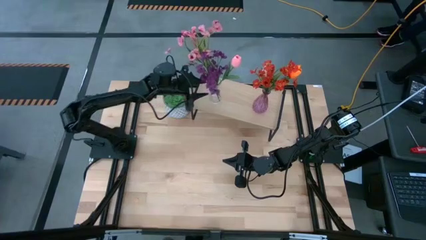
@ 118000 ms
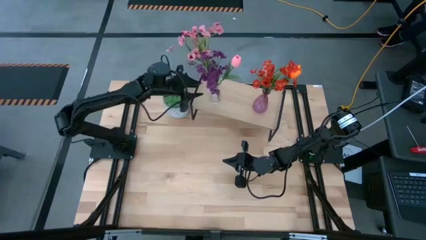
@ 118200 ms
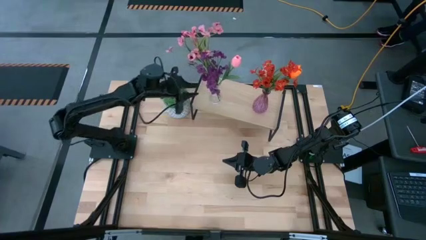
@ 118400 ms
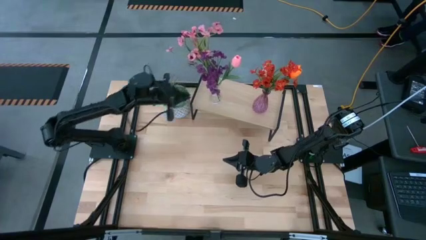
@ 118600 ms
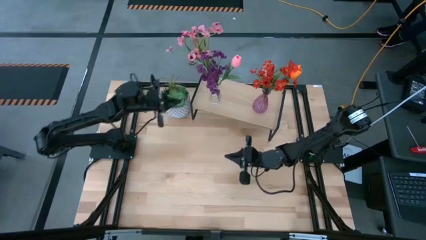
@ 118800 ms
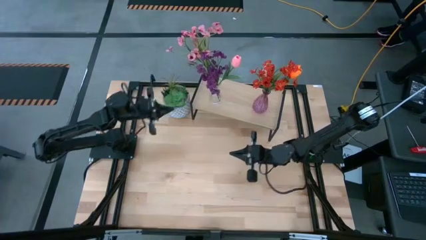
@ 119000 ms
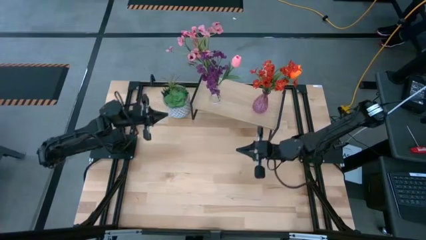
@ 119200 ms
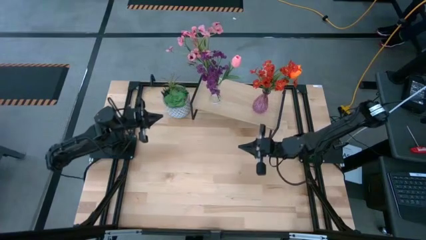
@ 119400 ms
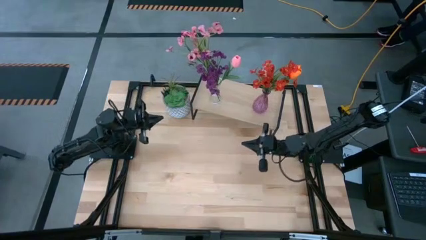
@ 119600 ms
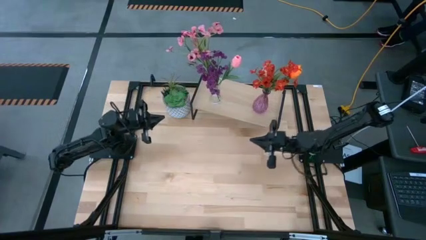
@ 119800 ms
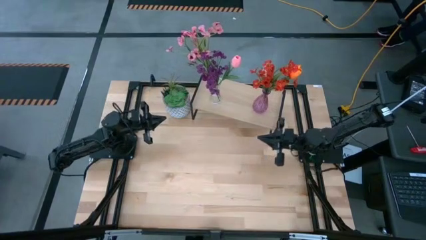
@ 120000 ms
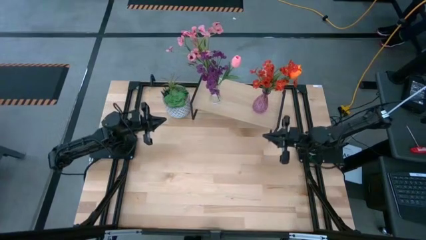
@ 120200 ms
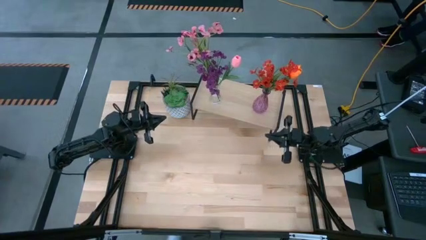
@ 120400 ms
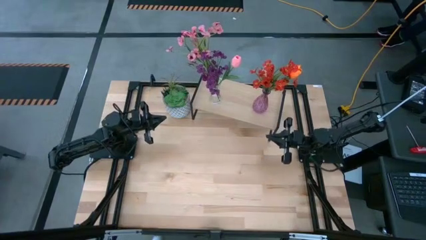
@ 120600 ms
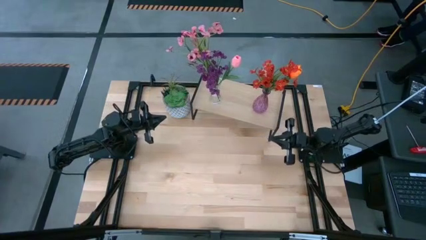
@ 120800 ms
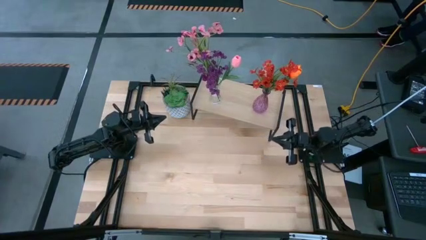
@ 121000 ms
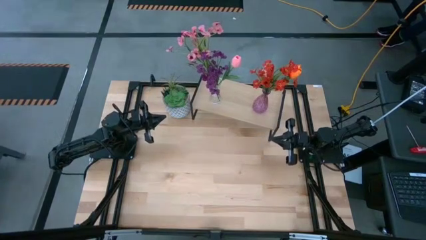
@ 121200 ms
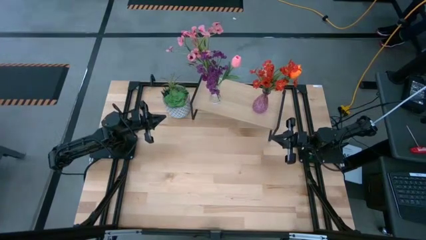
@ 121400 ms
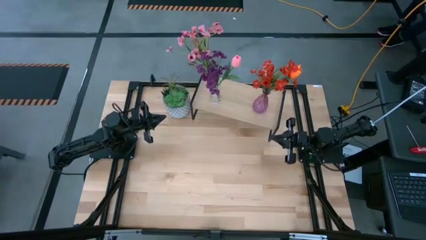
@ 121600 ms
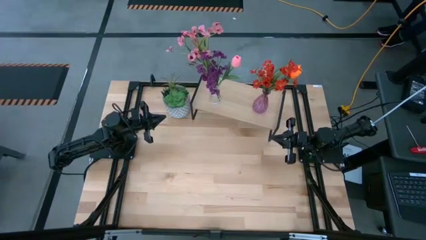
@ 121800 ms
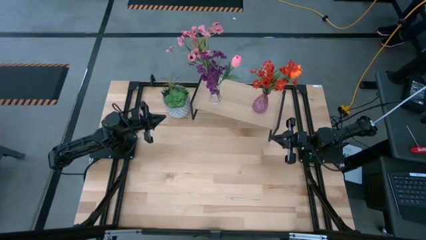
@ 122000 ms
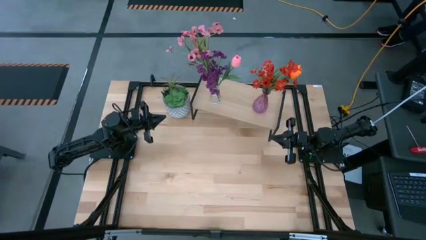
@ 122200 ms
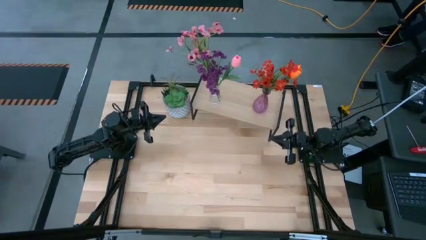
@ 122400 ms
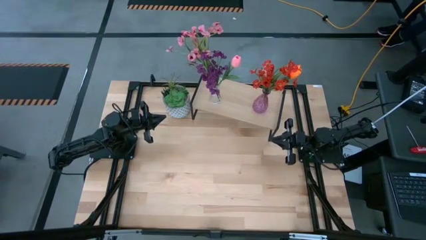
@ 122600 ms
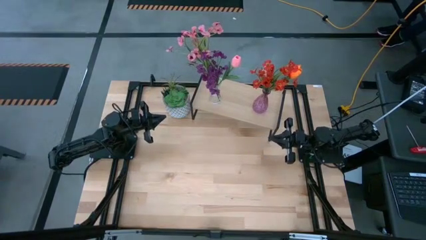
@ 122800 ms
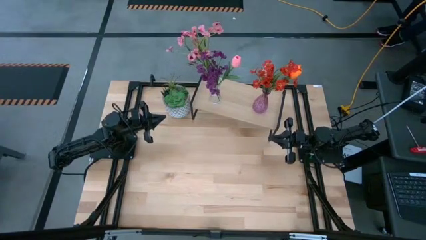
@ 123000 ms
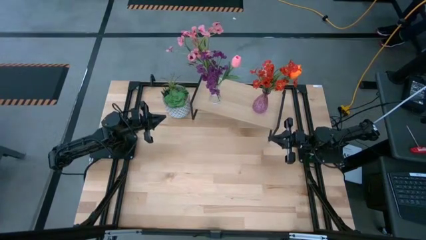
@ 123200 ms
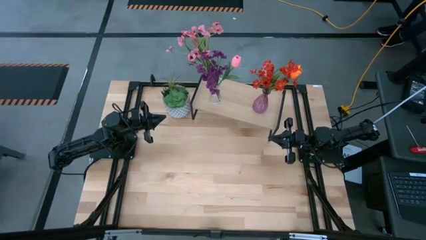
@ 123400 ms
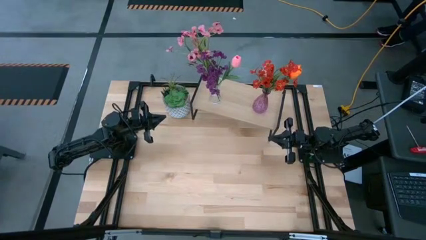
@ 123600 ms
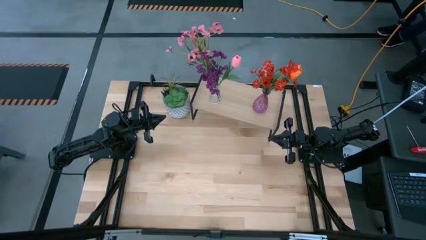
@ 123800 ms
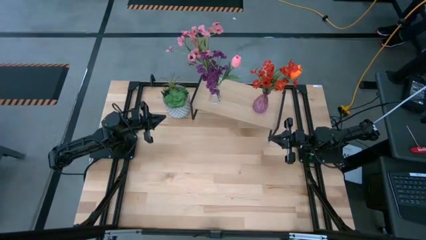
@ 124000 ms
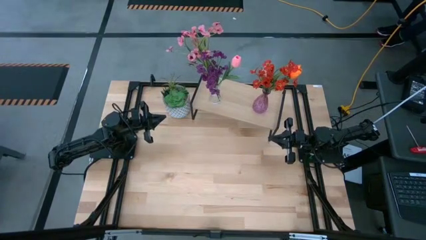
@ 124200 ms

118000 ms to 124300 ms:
Task: Pick and place flowers into a vace then onto a shelf
Return to Home Position

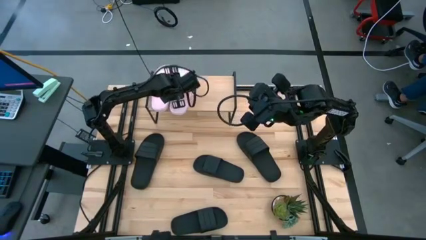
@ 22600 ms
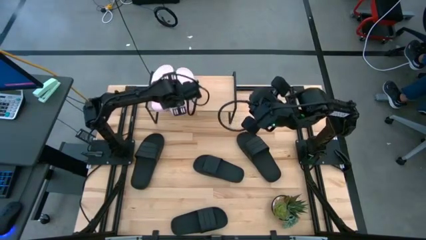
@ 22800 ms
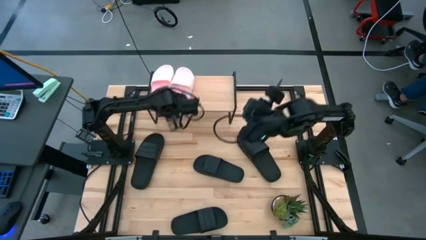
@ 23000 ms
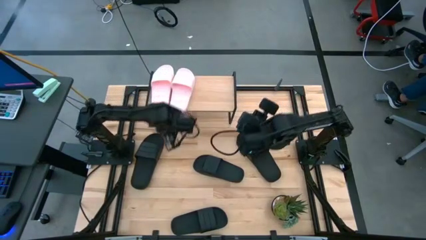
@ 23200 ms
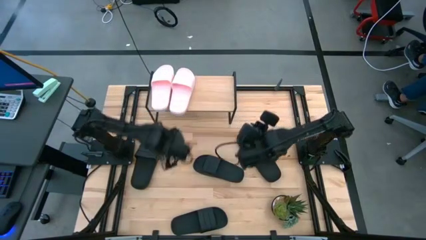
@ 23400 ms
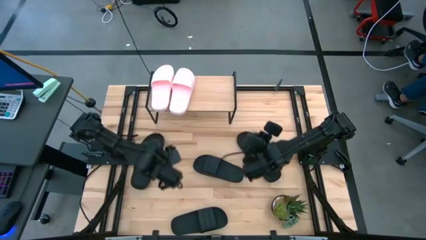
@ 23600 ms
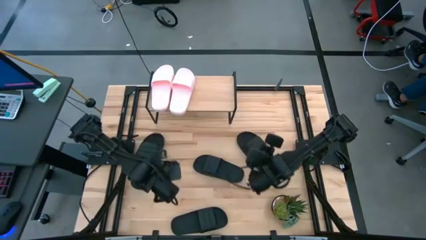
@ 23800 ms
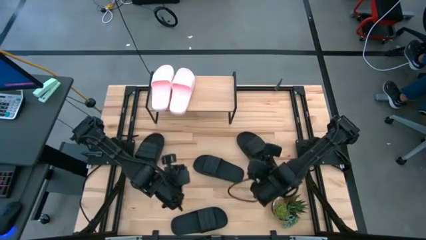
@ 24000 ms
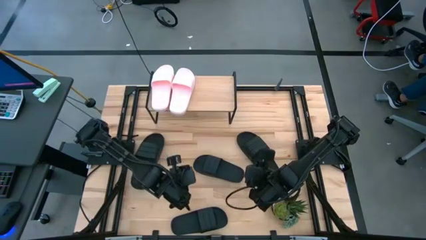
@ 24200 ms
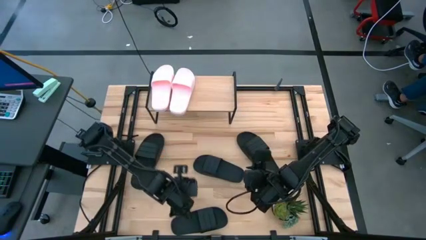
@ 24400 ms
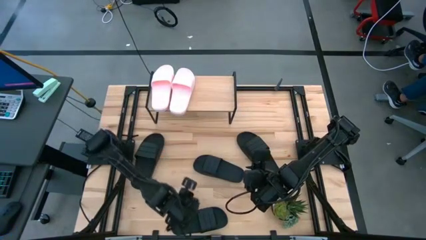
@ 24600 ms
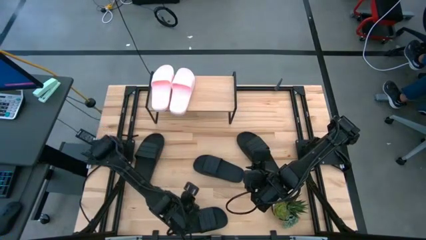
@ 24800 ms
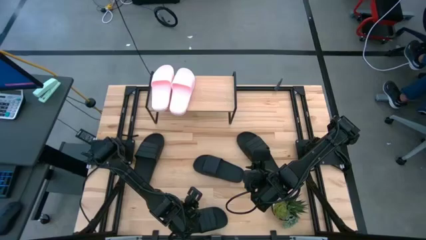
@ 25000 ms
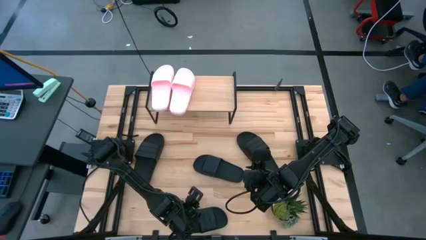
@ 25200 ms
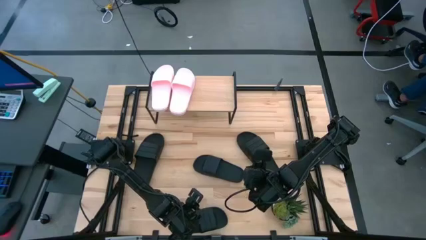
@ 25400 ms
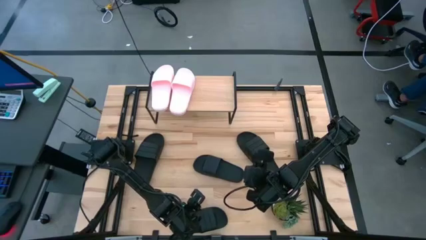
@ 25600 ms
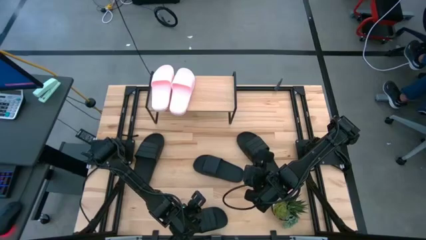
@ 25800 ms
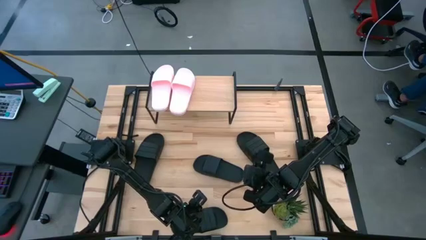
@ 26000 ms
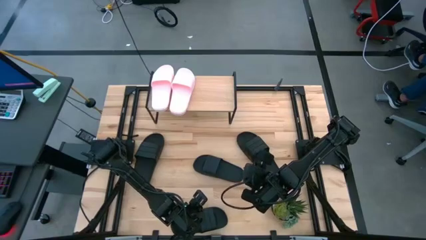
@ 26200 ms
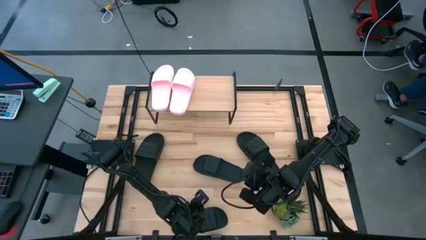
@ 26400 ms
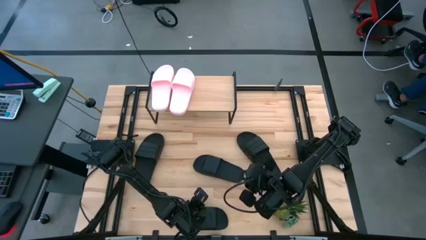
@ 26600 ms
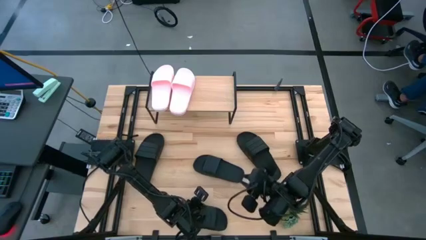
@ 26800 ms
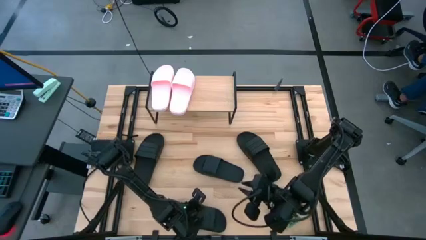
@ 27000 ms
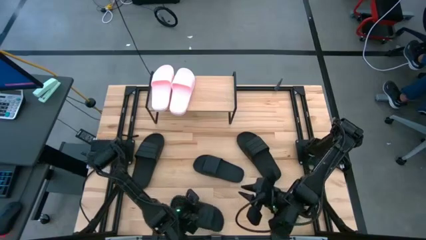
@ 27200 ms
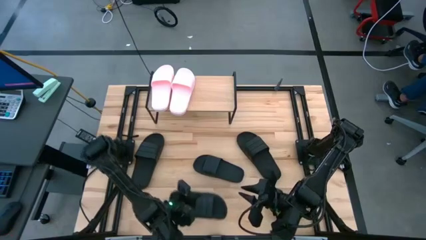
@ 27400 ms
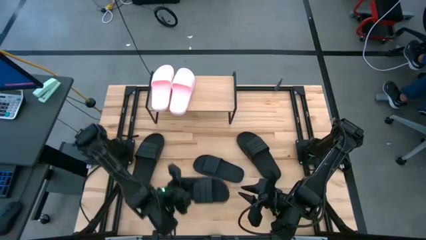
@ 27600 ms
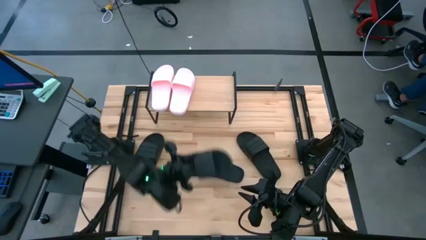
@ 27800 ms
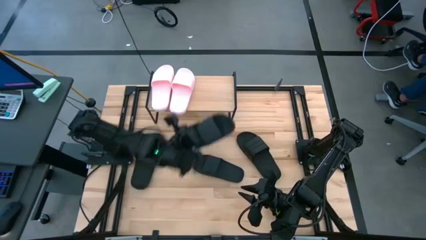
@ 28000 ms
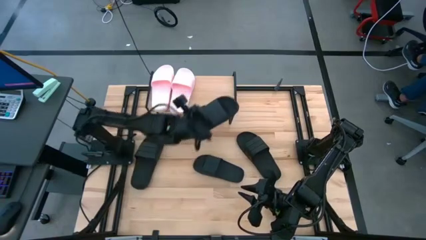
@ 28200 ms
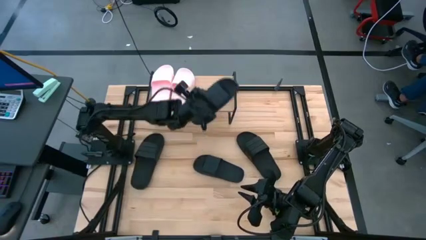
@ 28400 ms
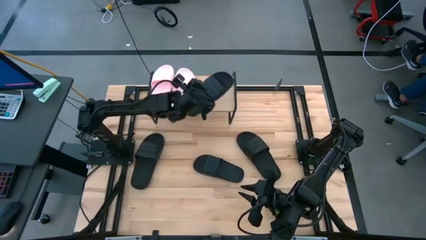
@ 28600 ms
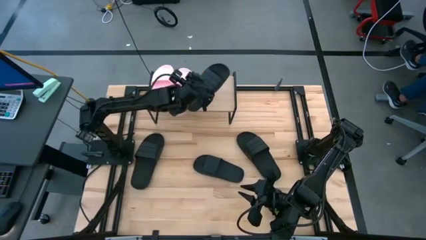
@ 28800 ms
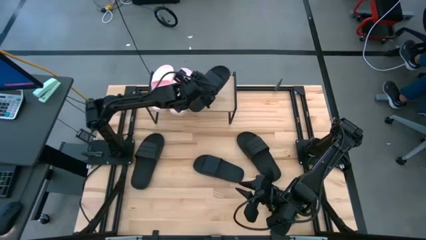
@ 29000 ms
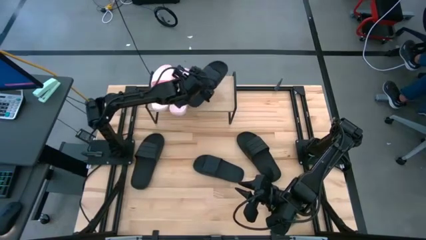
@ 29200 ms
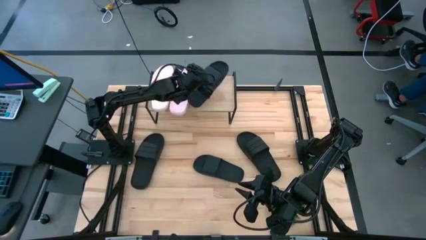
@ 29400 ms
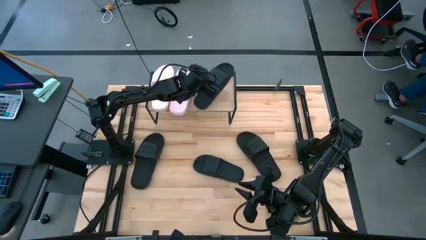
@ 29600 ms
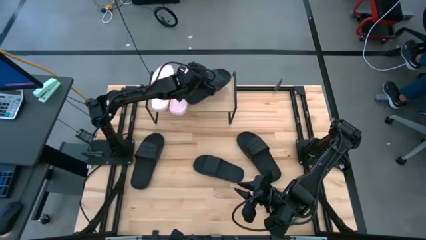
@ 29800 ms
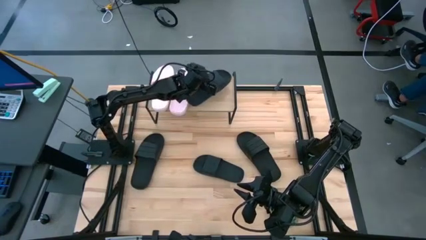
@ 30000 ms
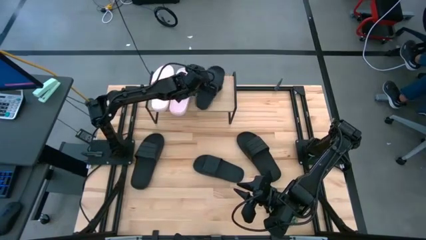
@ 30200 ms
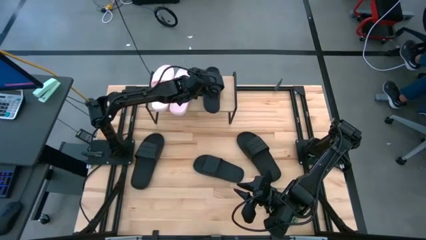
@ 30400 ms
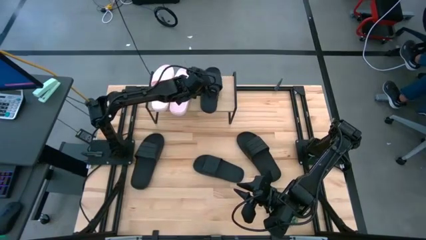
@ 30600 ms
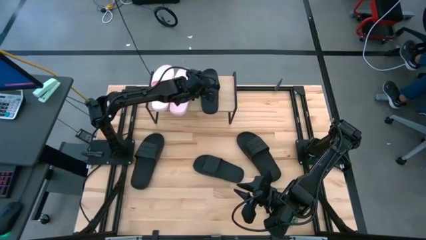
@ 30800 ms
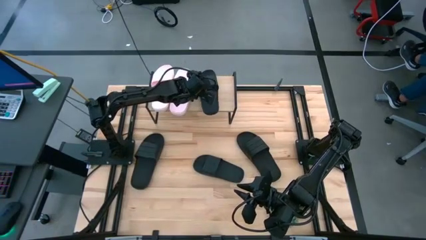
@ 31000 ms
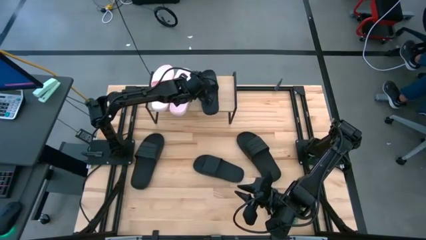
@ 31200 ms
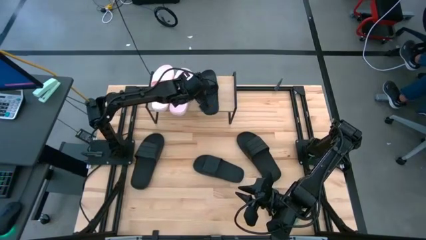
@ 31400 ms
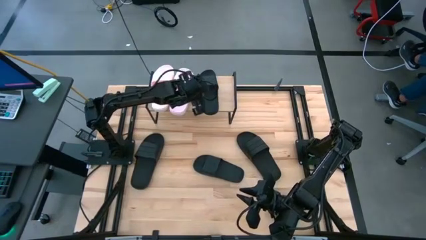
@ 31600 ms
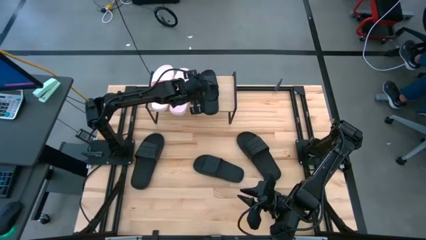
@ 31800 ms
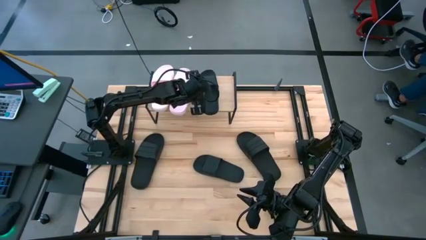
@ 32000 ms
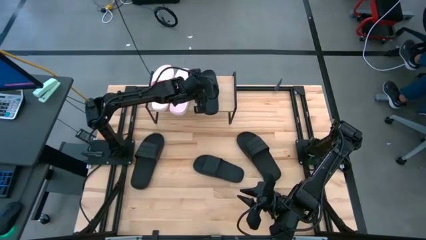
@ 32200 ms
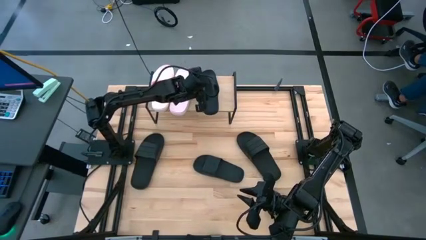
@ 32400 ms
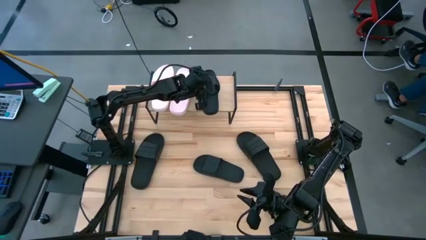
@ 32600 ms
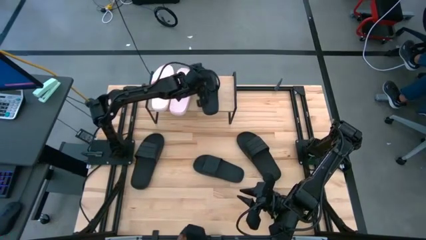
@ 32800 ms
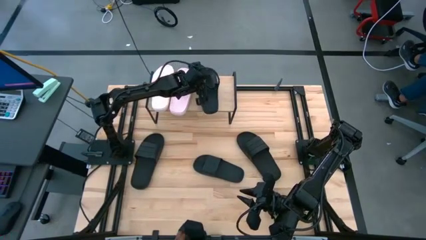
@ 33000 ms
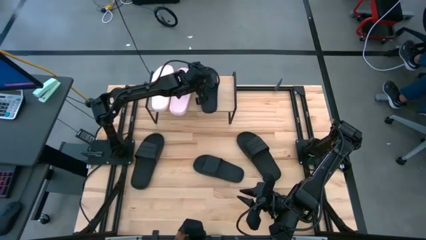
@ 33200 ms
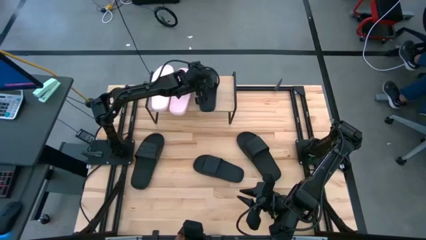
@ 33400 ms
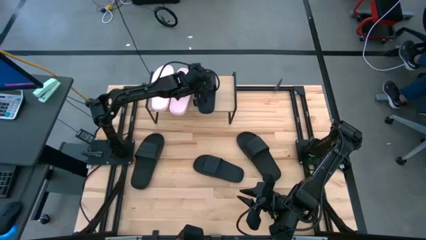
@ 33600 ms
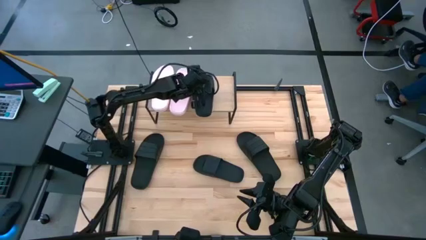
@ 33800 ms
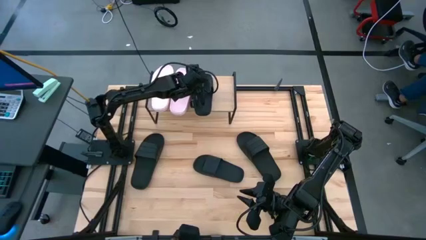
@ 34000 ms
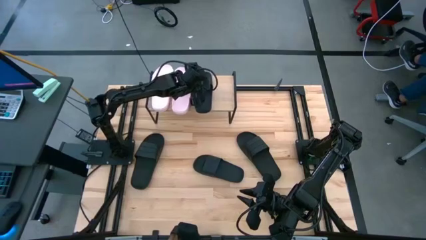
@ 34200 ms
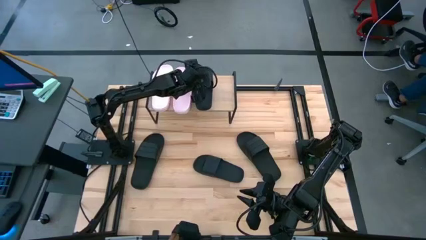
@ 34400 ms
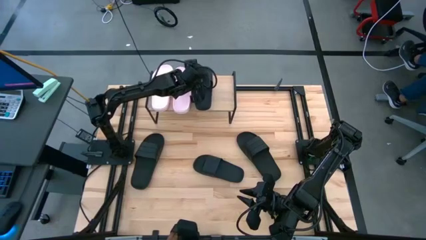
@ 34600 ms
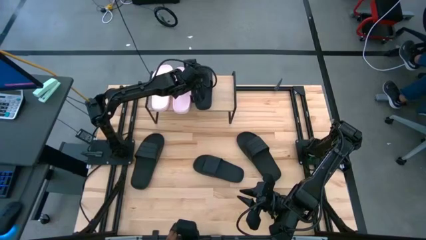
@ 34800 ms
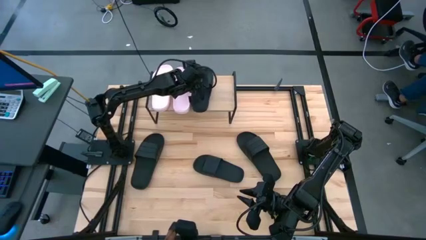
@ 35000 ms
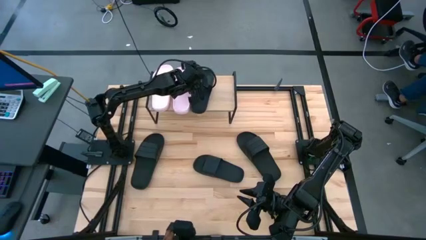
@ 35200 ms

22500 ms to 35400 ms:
Task: Pick and place slides into the shelf
Put the black slide on the shelf
